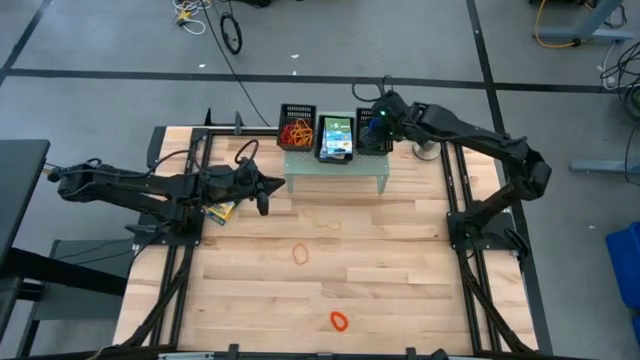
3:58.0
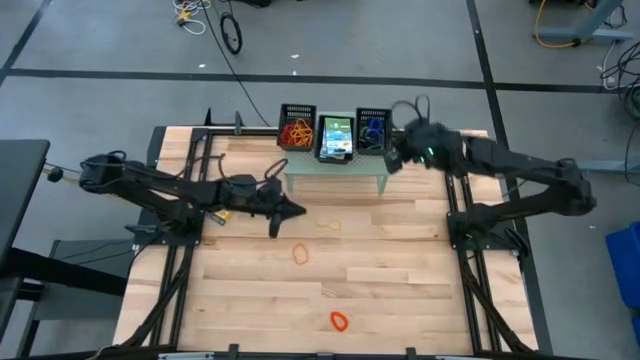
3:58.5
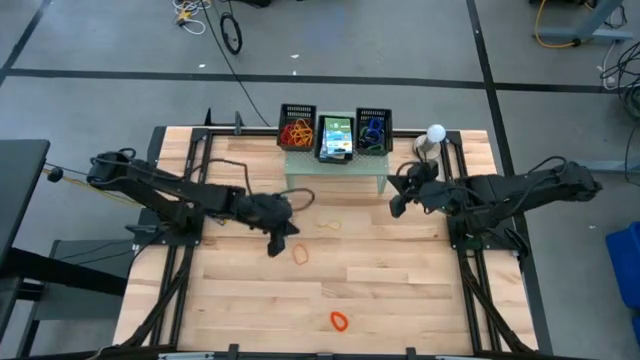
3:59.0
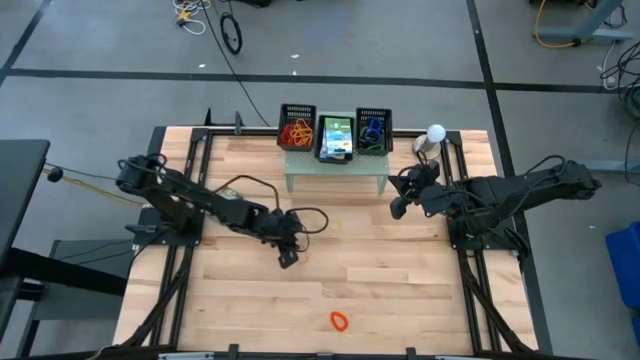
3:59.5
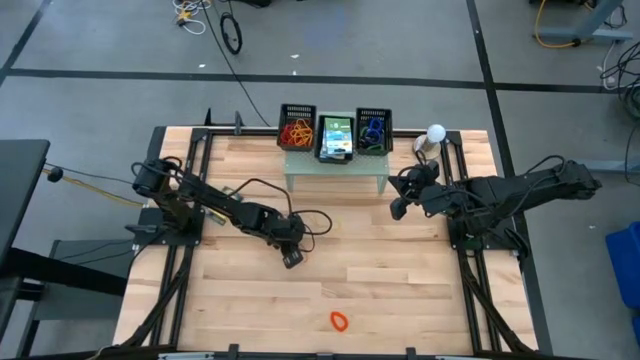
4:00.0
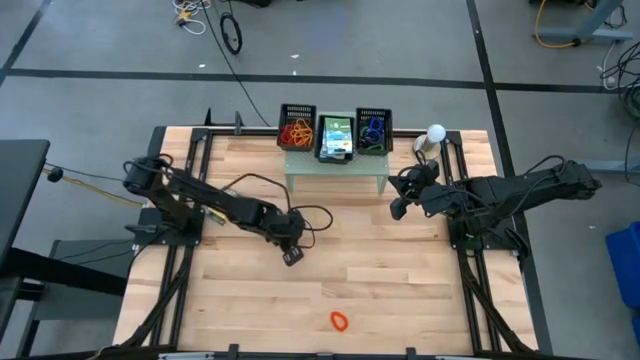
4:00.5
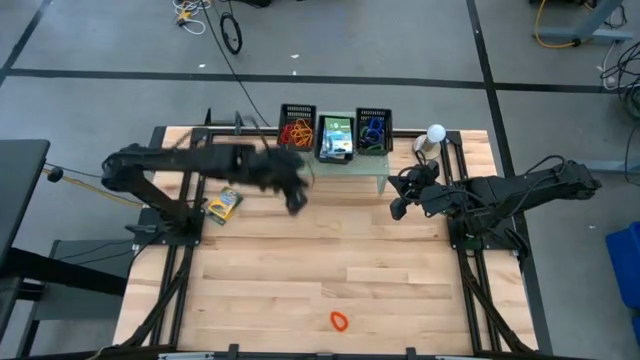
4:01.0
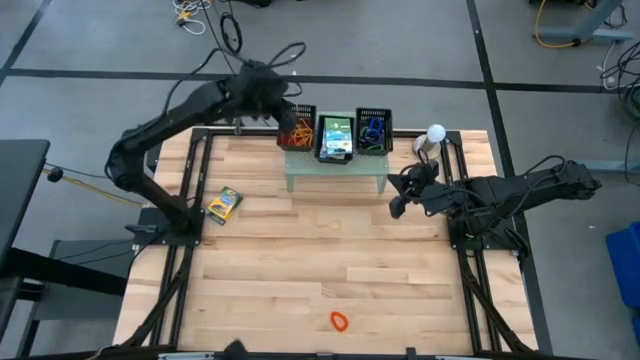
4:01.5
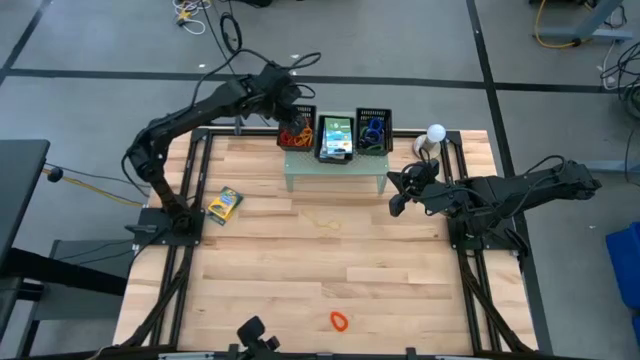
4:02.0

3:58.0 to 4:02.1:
Task: Pick & Place Office Desk Supplies
Put the orange rubber band into the left black bin on the shelf

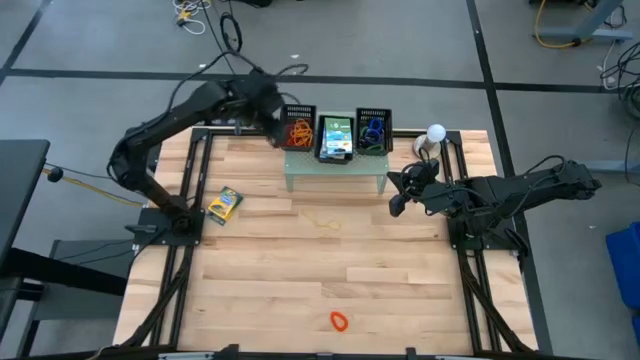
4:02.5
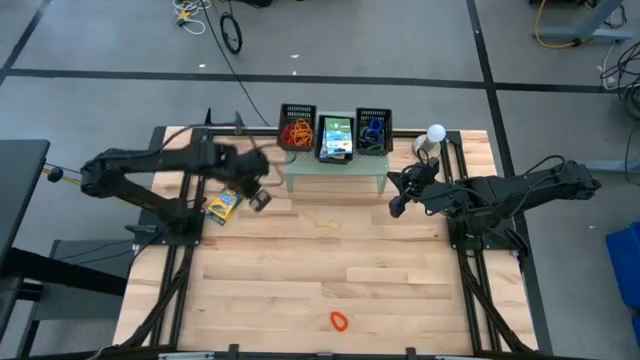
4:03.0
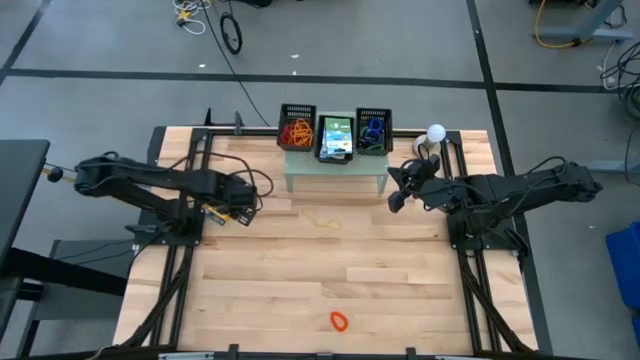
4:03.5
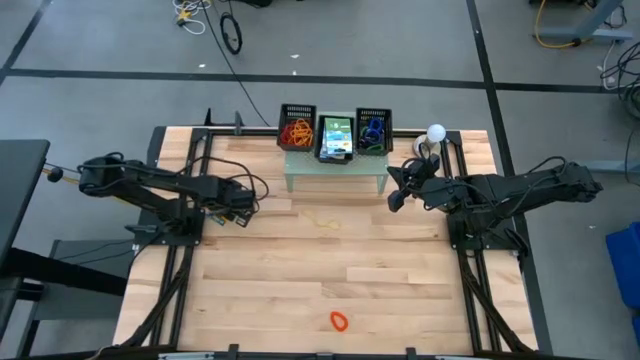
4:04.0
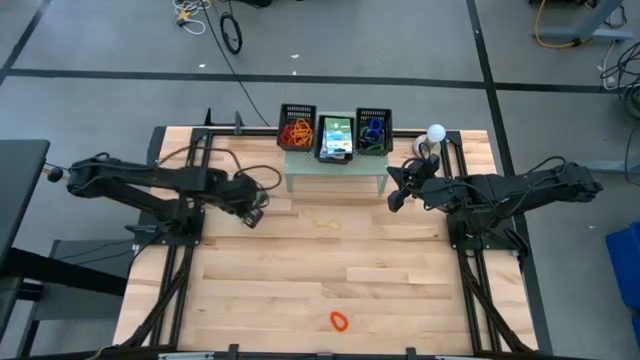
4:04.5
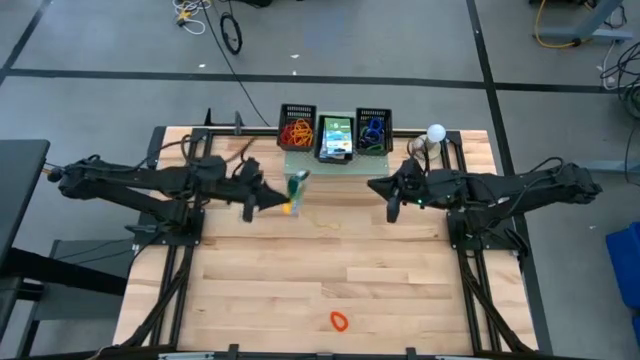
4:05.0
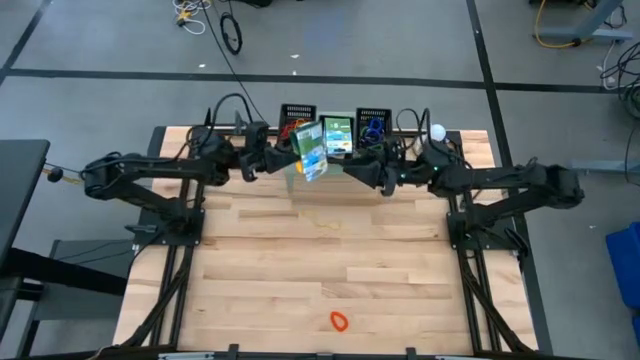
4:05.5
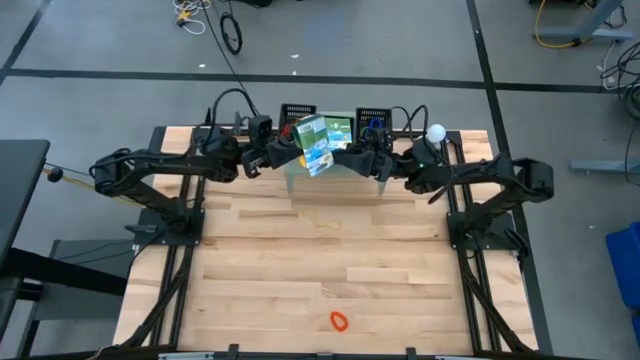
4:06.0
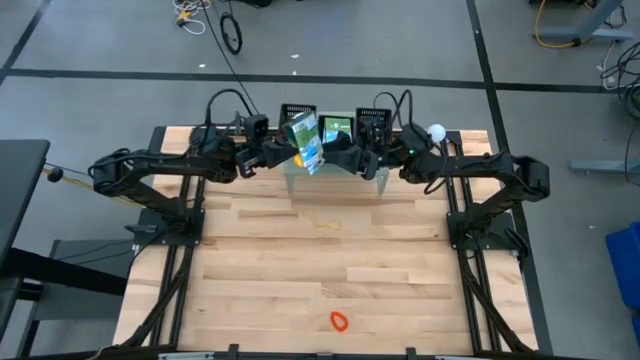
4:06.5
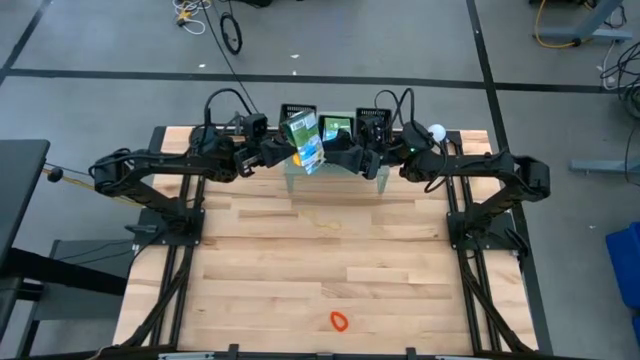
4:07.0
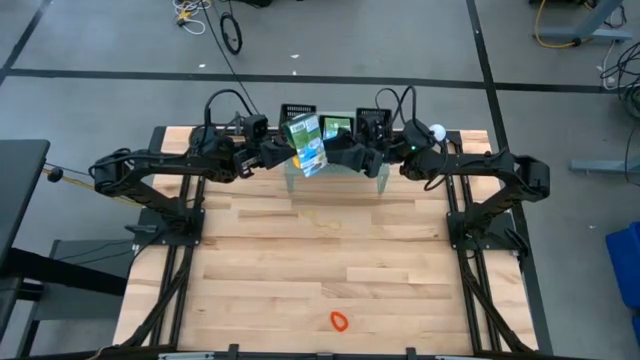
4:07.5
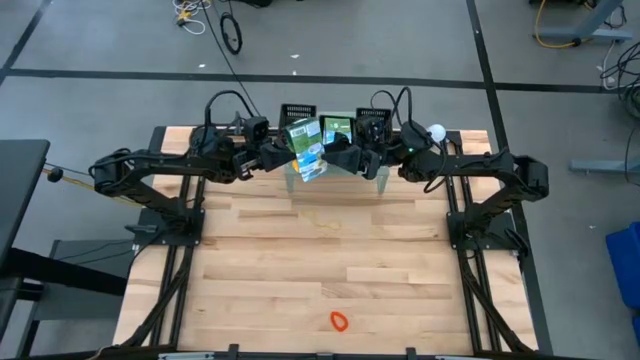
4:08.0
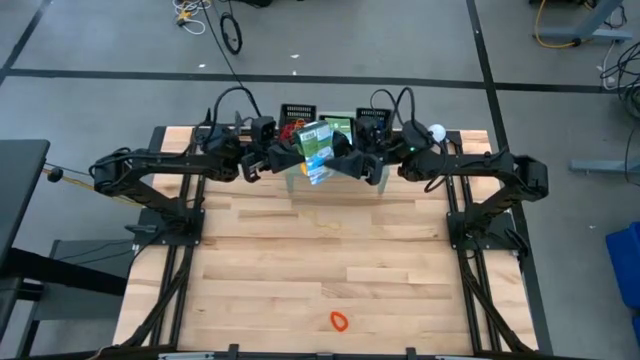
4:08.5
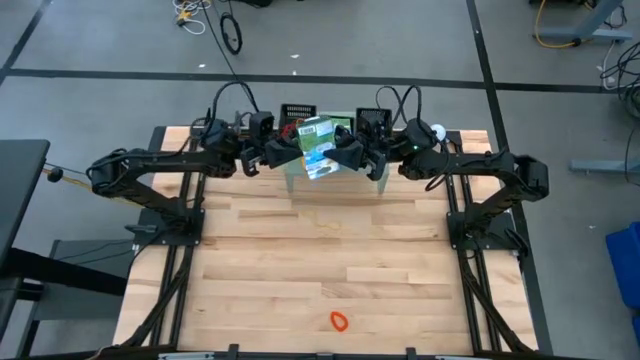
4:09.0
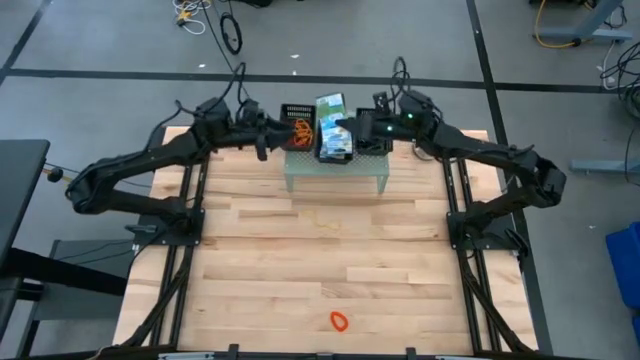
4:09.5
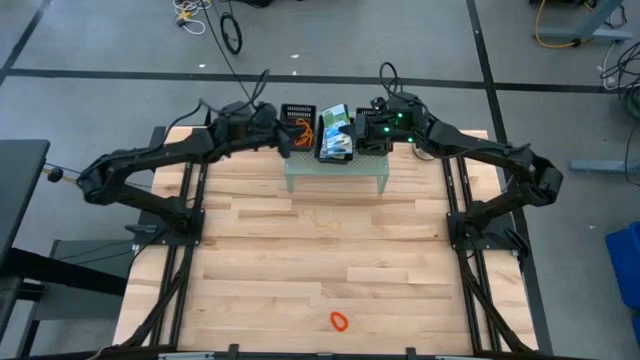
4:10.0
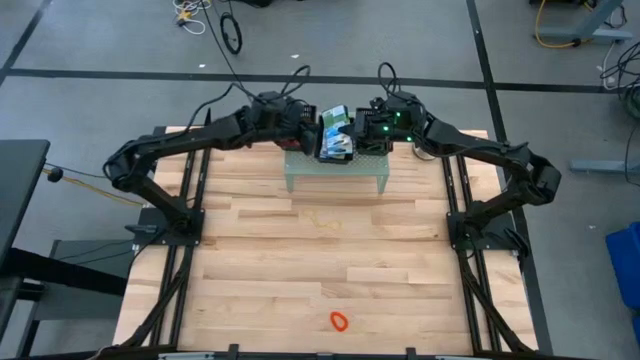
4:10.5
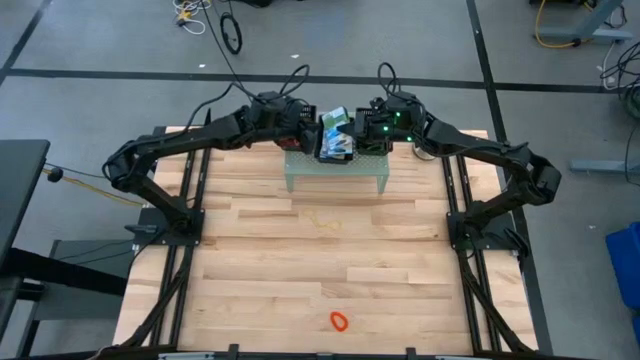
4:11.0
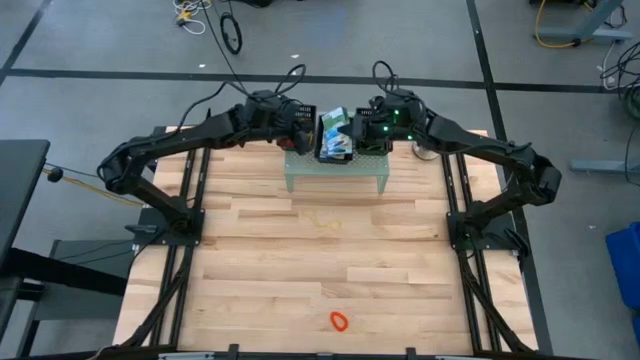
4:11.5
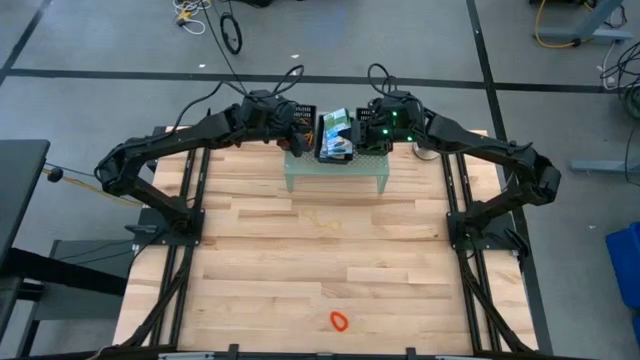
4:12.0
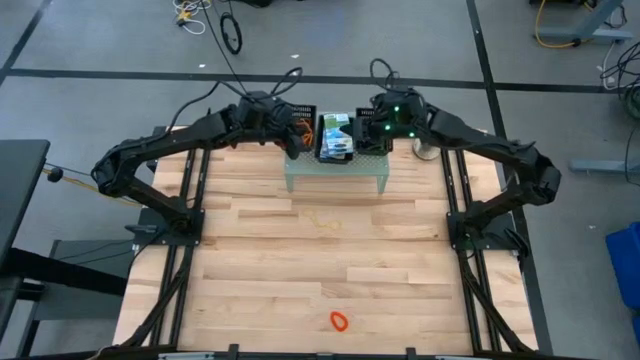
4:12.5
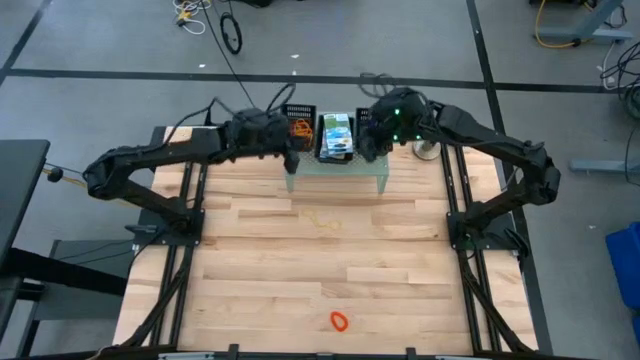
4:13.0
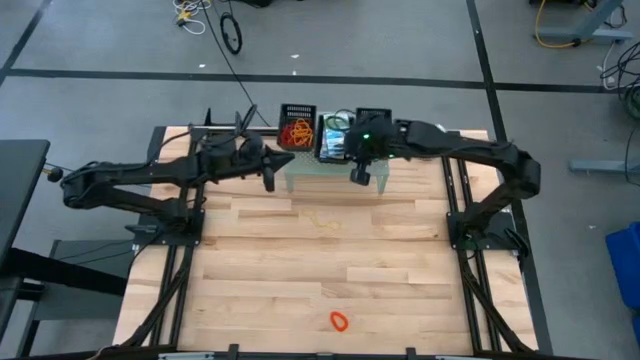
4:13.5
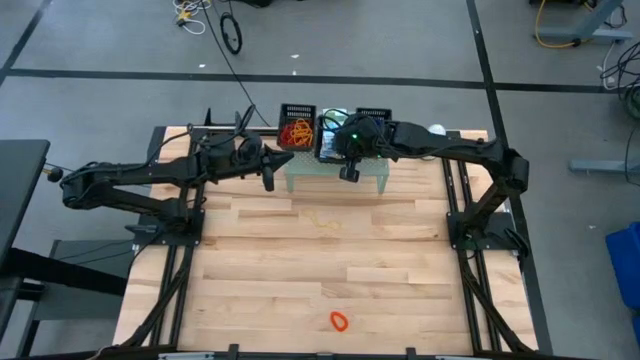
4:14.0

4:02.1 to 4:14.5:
Put the crayon box on the middle black bin on the shelf

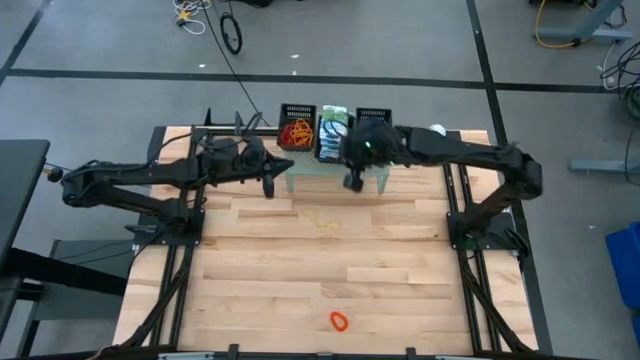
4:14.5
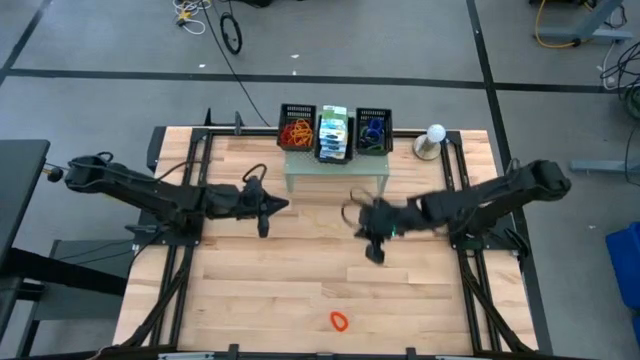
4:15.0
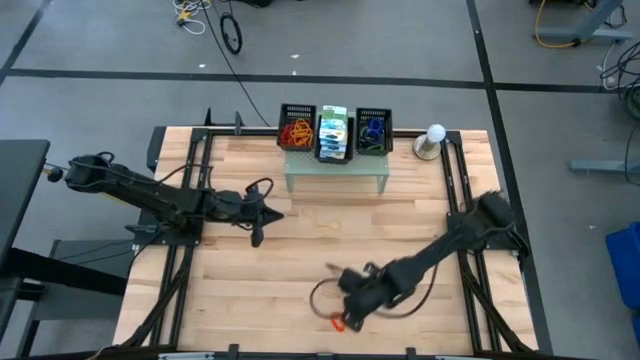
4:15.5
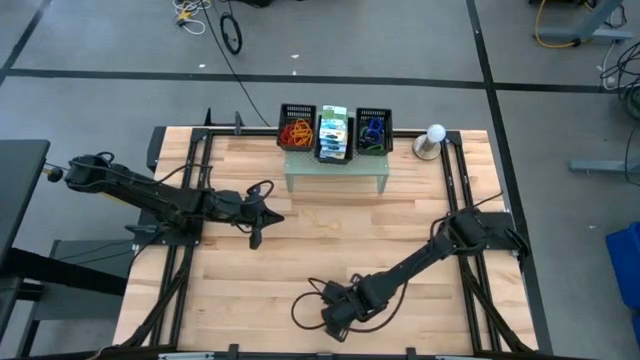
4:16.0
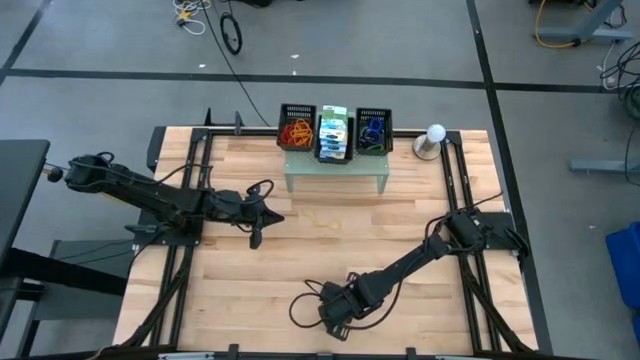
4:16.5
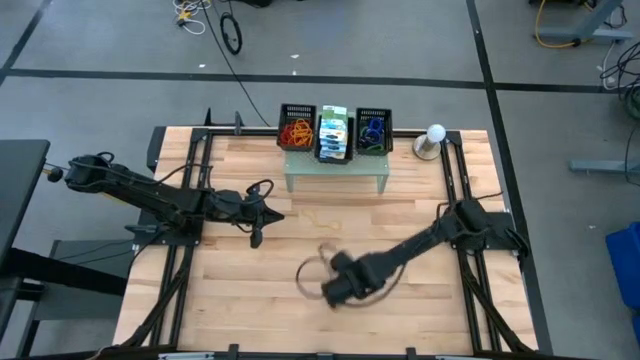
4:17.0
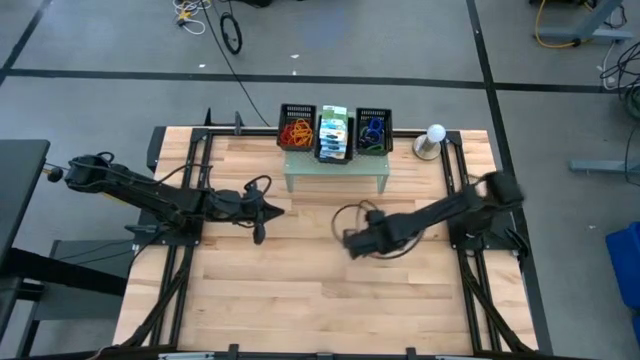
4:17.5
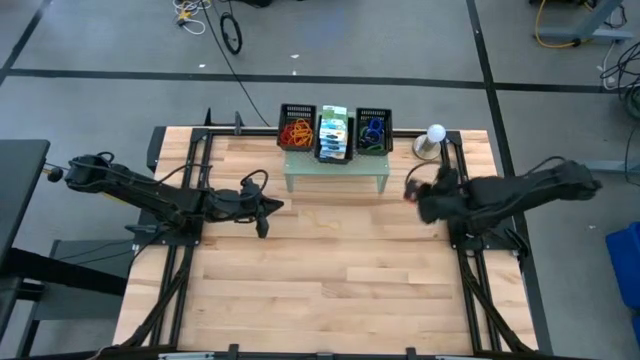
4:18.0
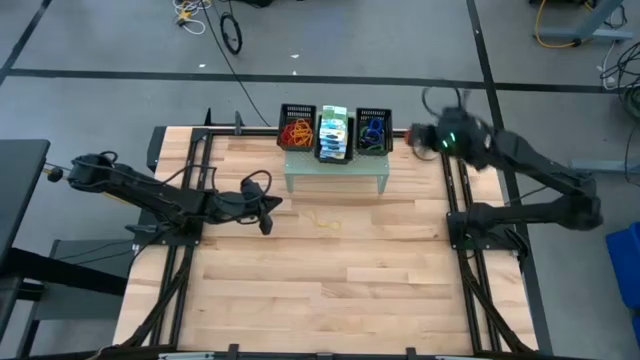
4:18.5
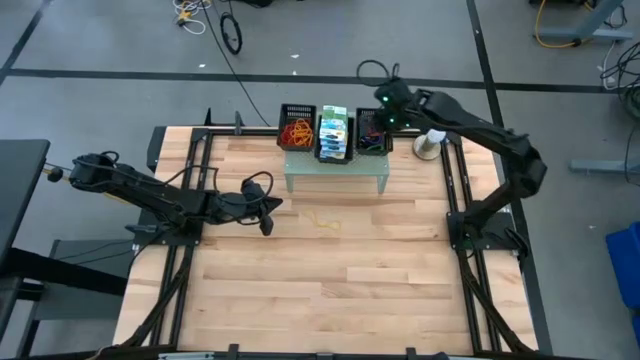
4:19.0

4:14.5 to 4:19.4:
Put the orange spring bracelet into the right black bin on the shelf

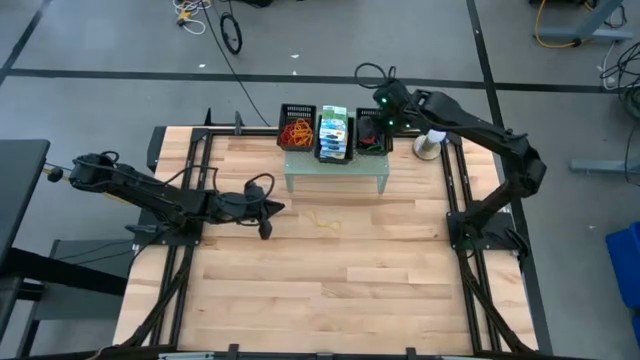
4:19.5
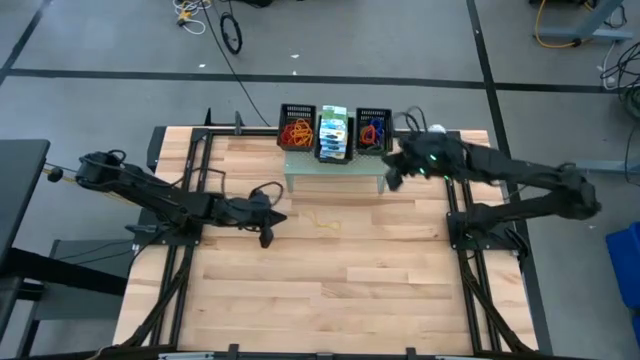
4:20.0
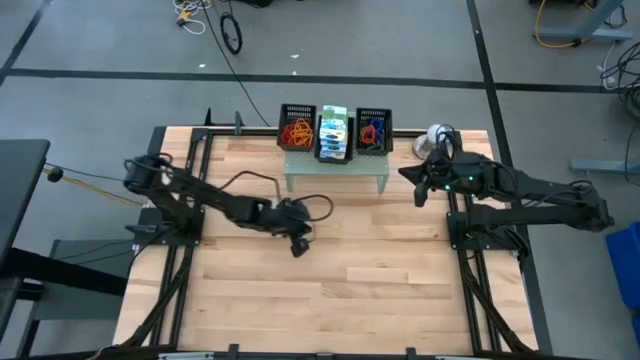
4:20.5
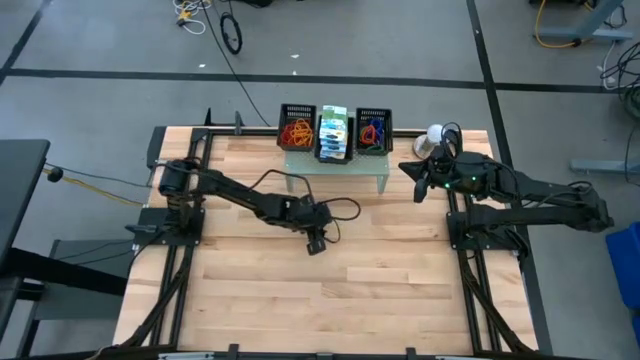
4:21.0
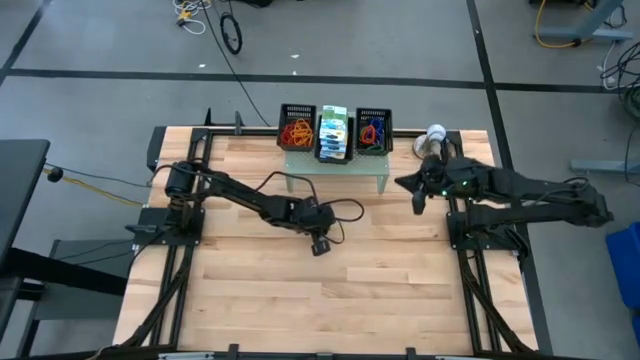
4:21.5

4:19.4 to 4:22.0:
Put the yellow rubber band into the left black bin on the shelf
